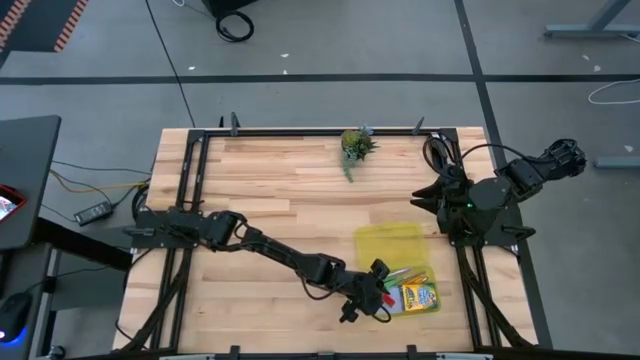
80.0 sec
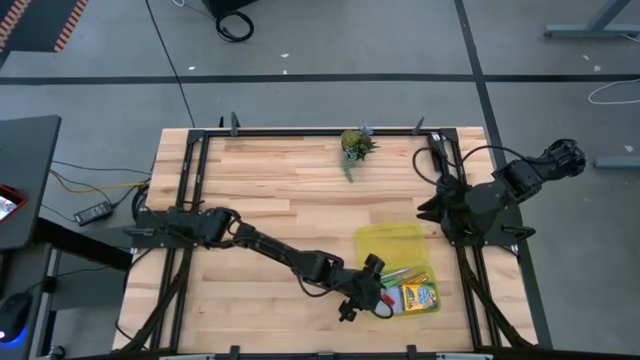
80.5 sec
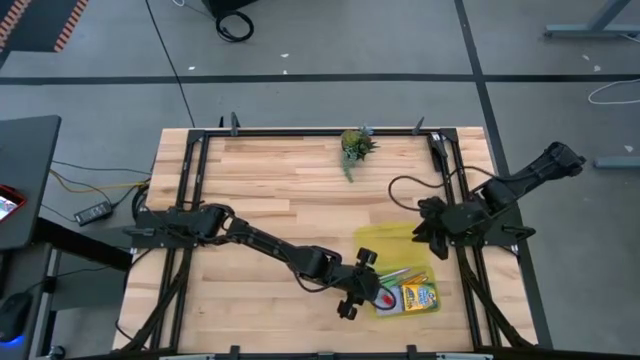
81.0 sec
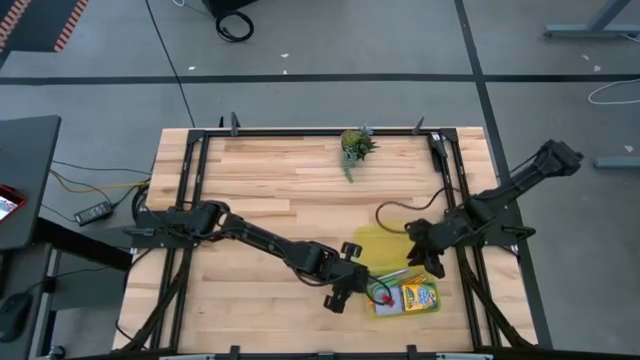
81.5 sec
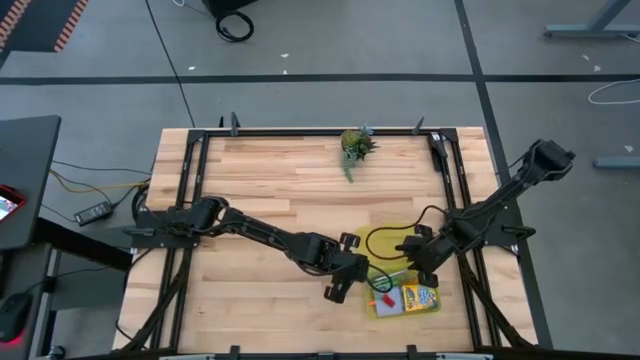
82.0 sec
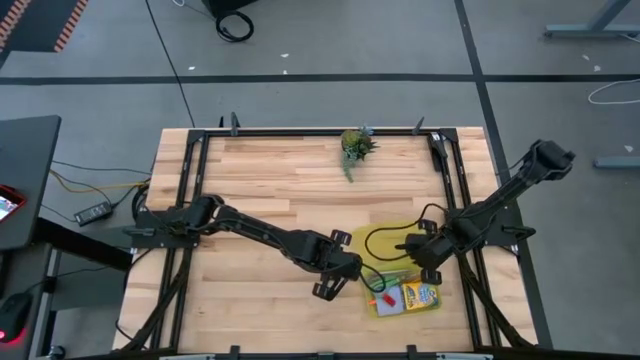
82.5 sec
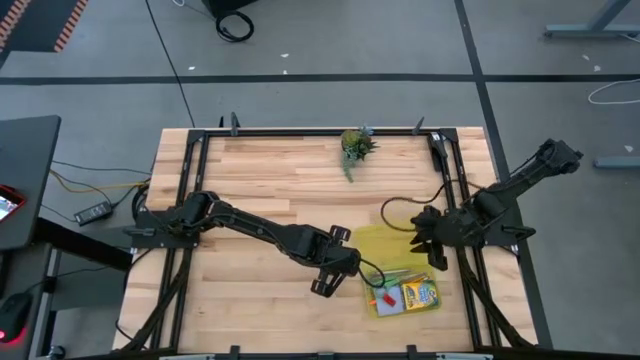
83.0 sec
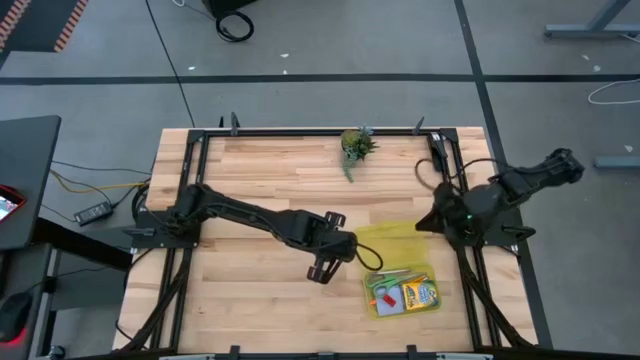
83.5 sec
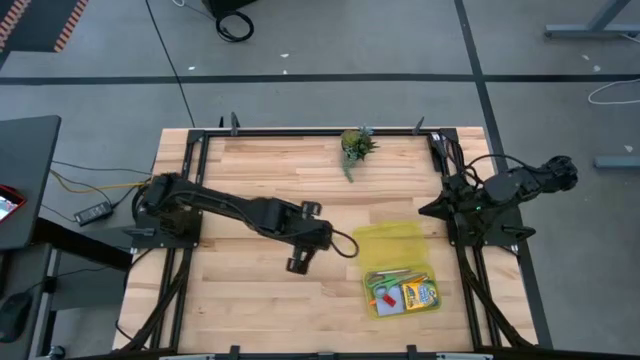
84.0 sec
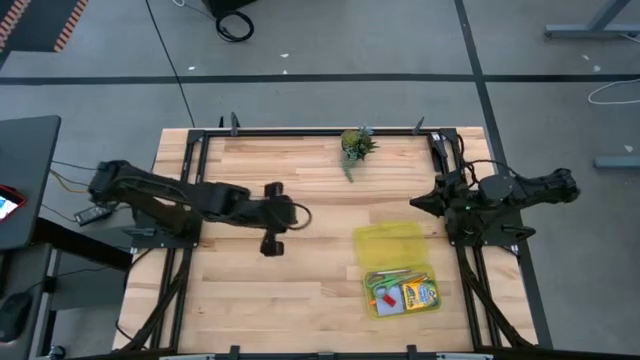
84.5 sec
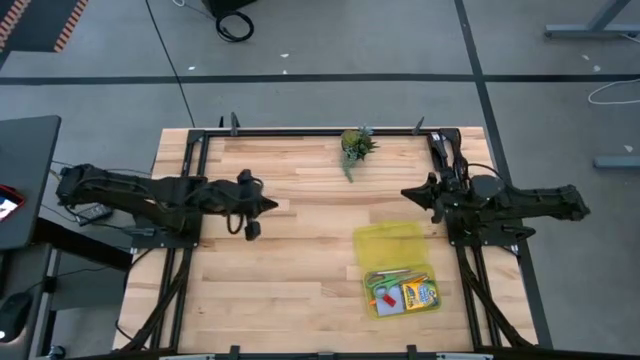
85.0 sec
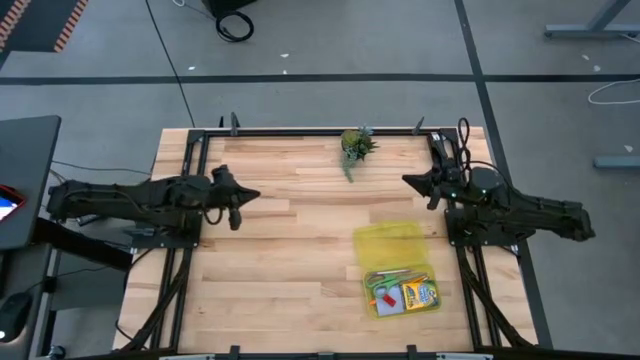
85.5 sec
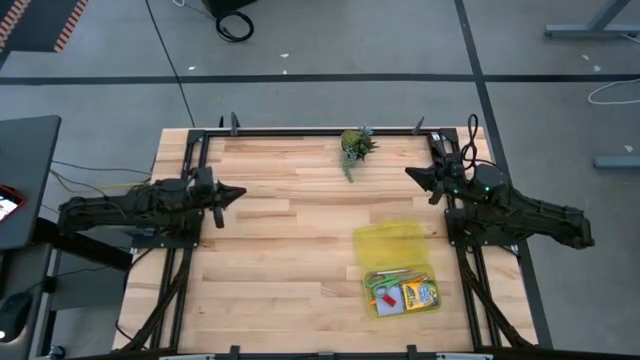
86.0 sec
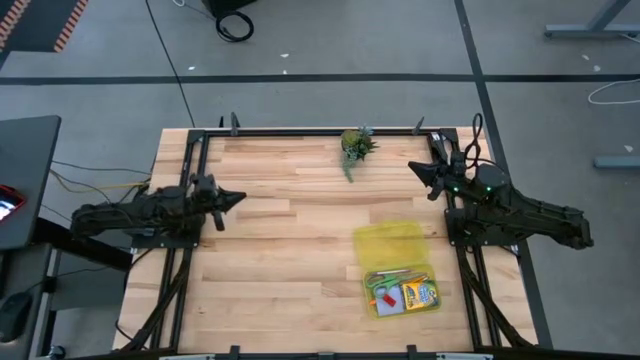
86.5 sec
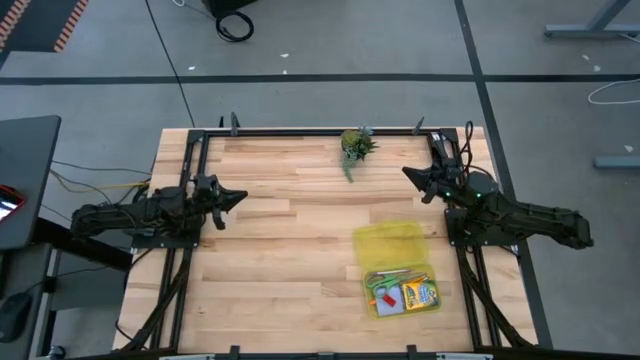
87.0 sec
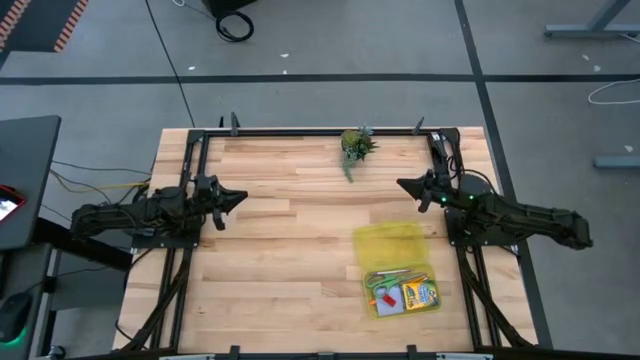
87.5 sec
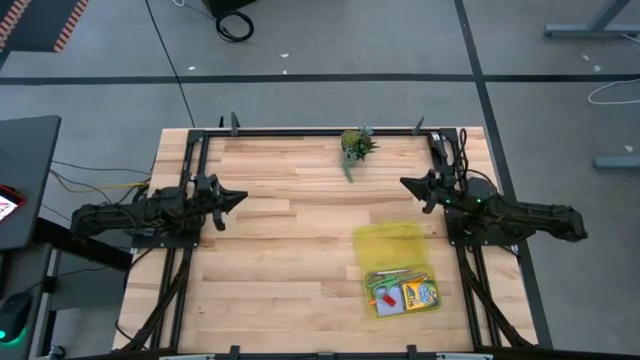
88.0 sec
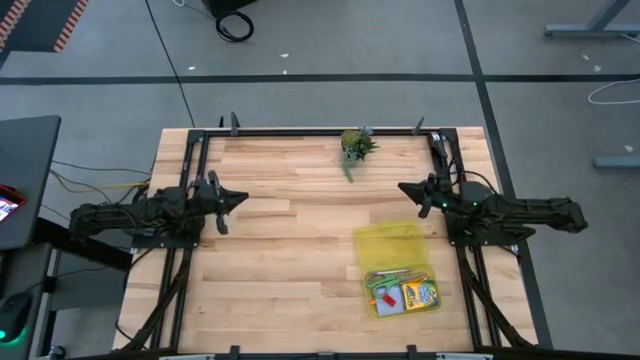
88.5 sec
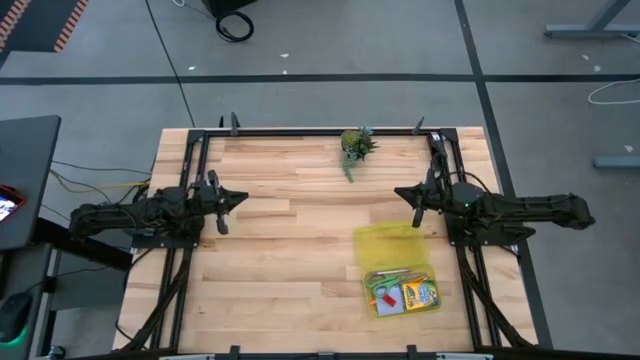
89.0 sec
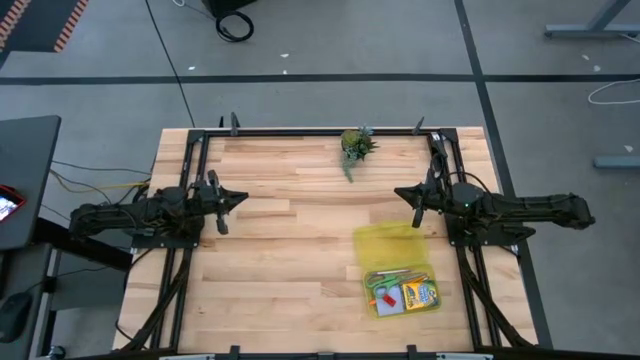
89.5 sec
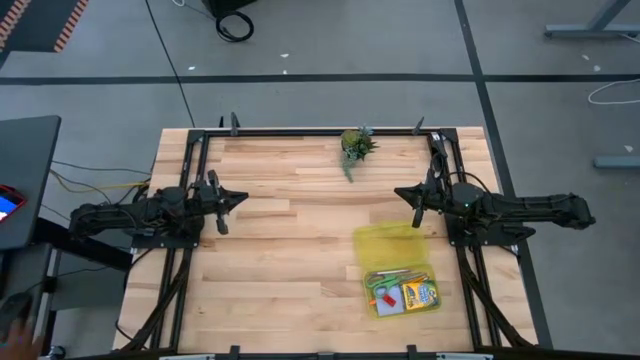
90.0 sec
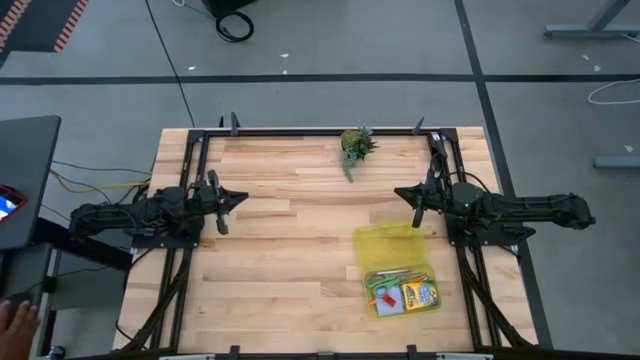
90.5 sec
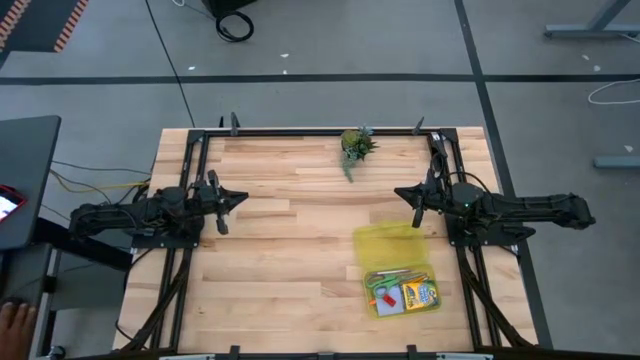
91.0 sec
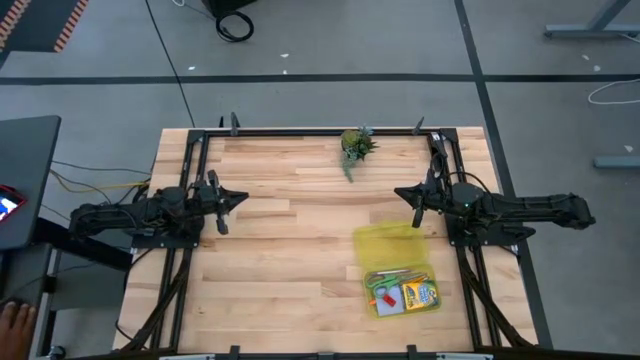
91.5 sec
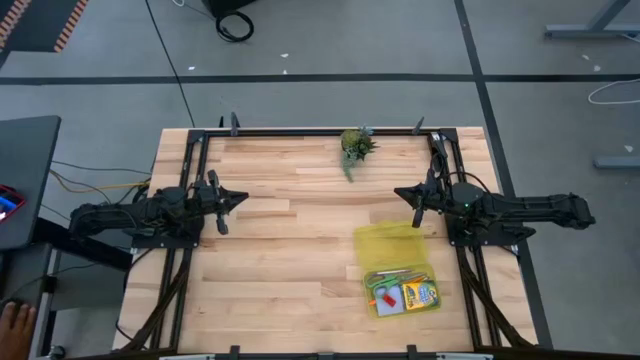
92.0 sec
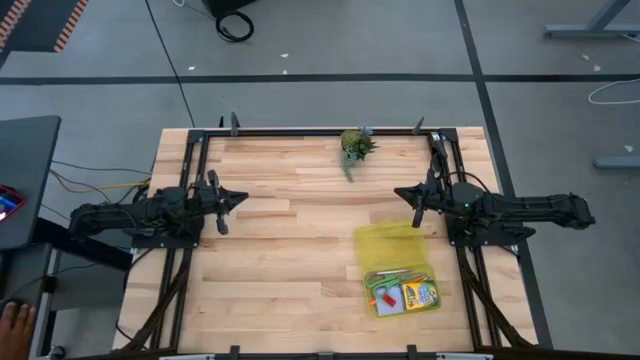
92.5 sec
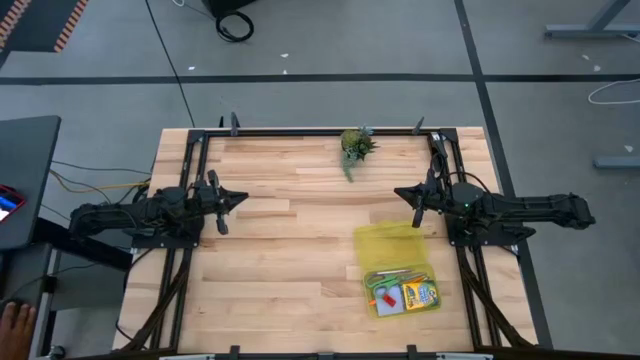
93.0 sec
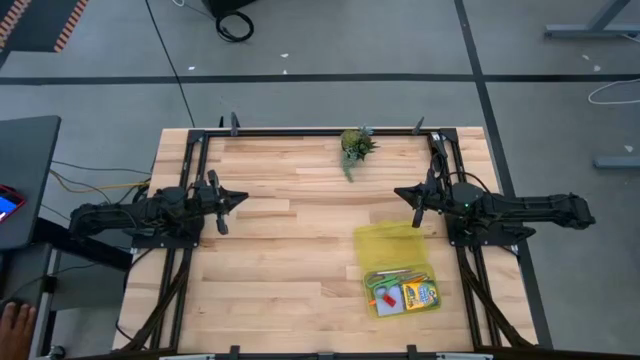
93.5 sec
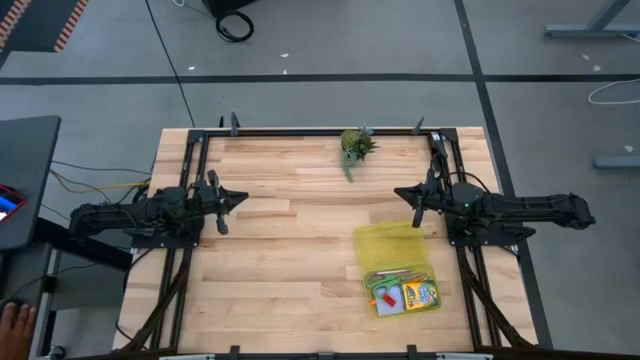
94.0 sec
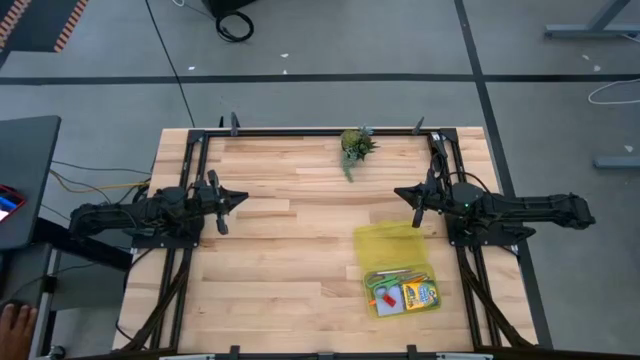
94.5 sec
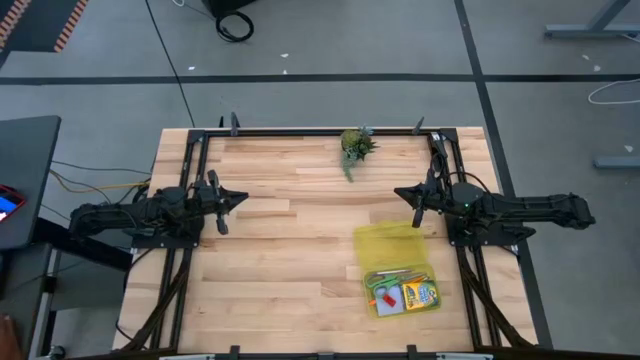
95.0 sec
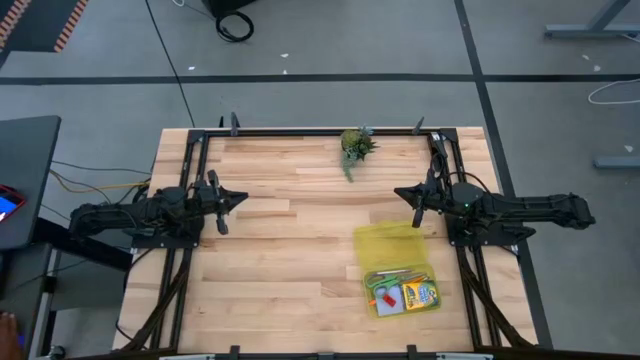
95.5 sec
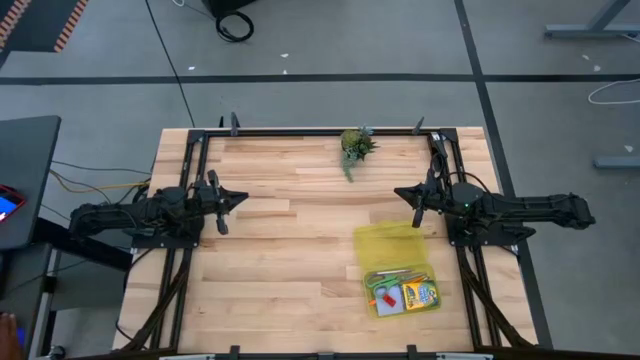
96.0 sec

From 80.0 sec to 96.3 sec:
Task: Pack school essentials
Return to Home Position

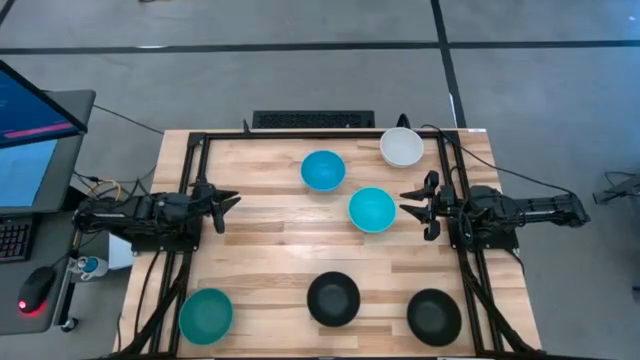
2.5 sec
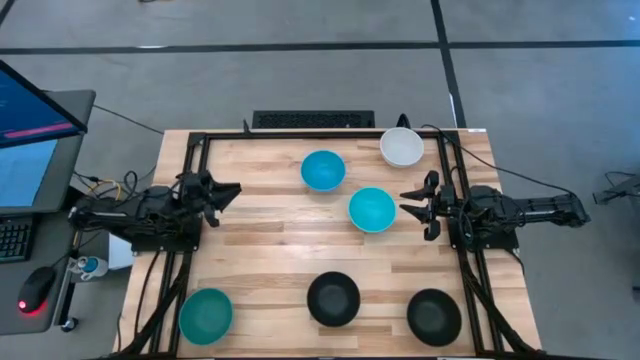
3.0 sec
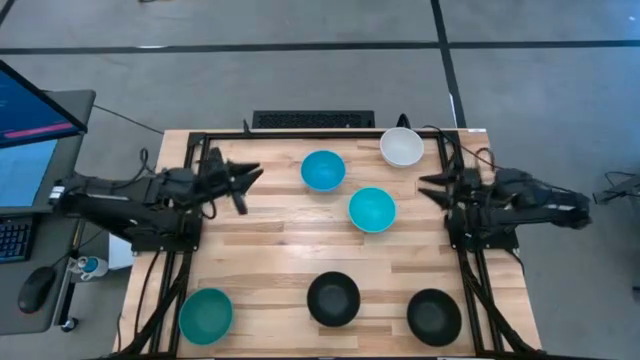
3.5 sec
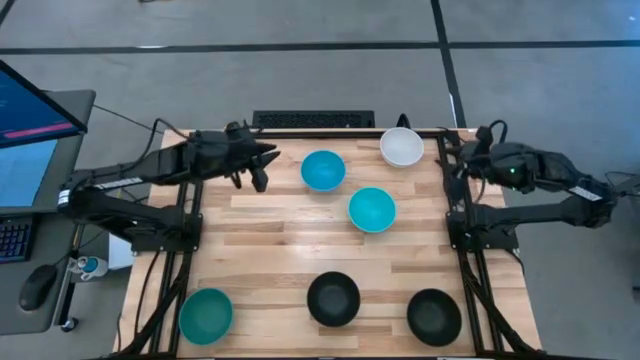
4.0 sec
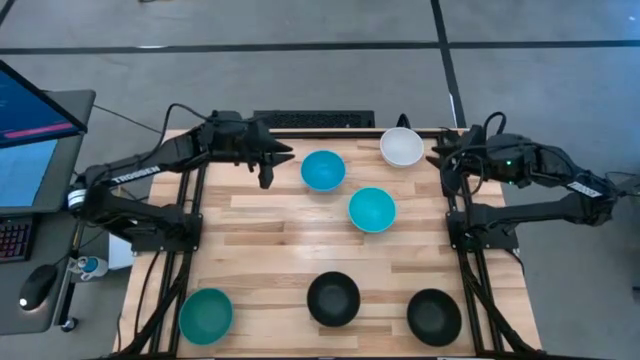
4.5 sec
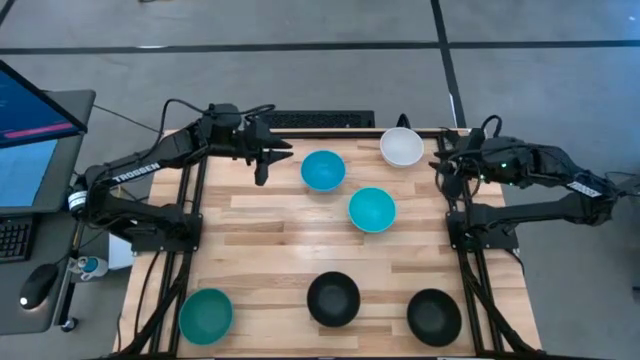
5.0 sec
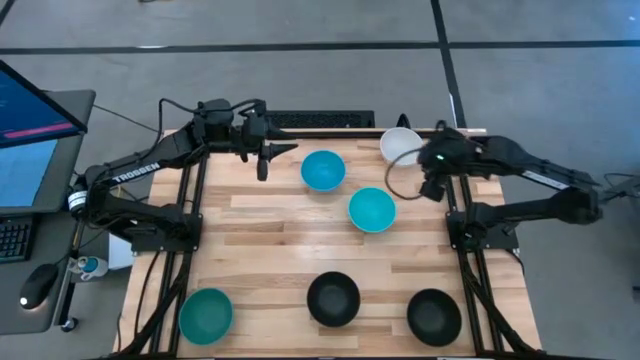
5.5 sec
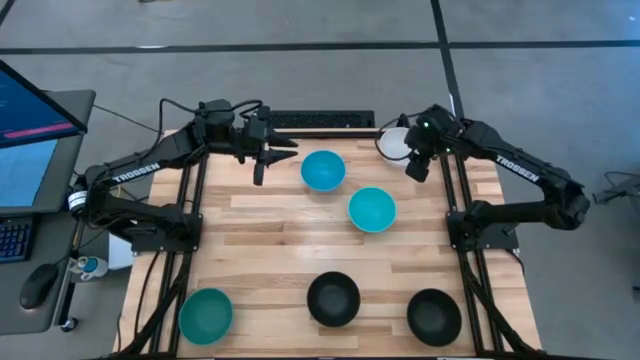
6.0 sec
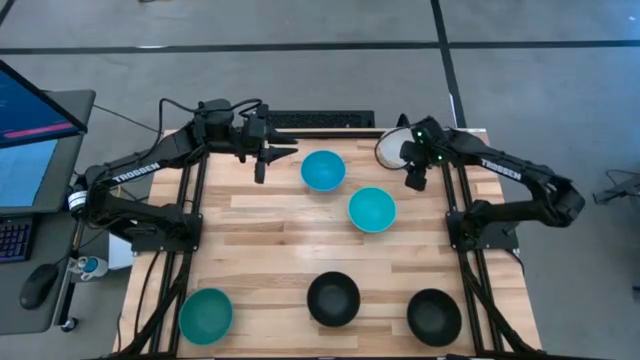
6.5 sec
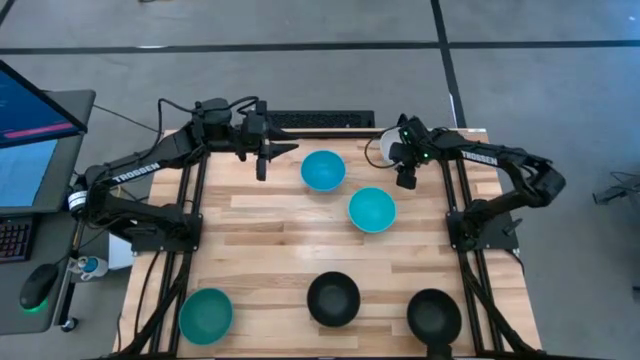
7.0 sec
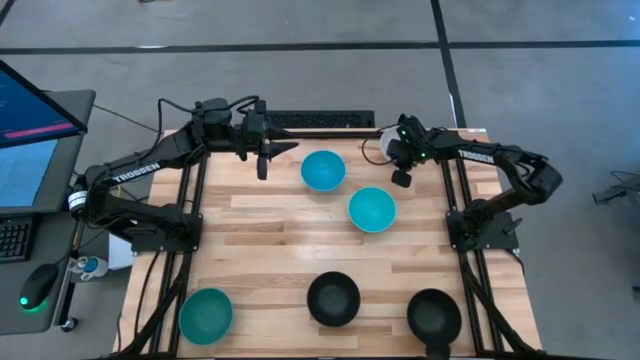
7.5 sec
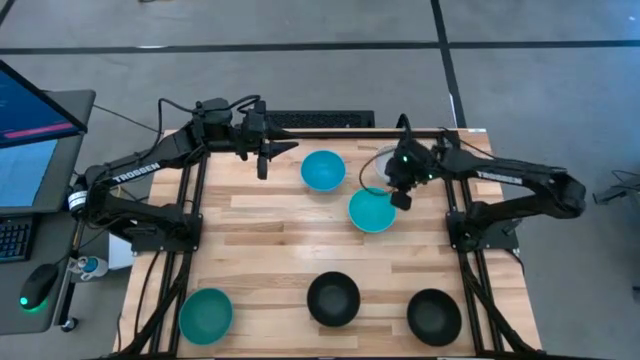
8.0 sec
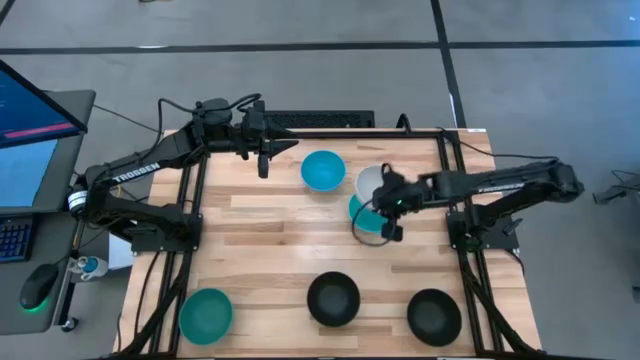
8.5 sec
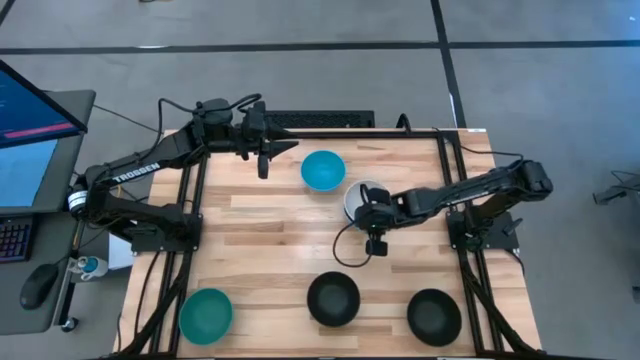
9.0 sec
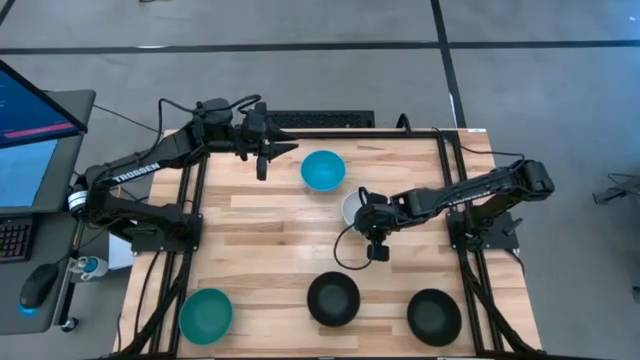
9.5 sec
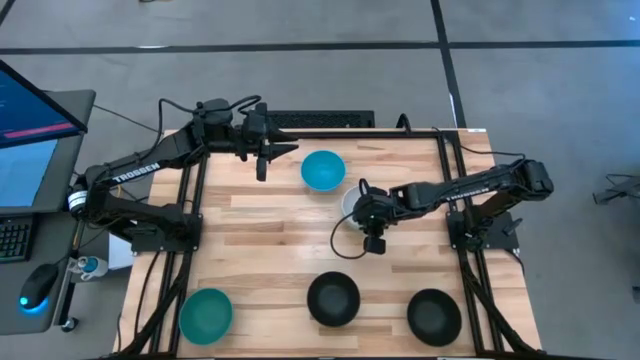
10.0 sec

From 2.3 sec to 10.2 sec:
Task: Nest bowls inside each other
Stack the white bowl on top of the light blue bowl
